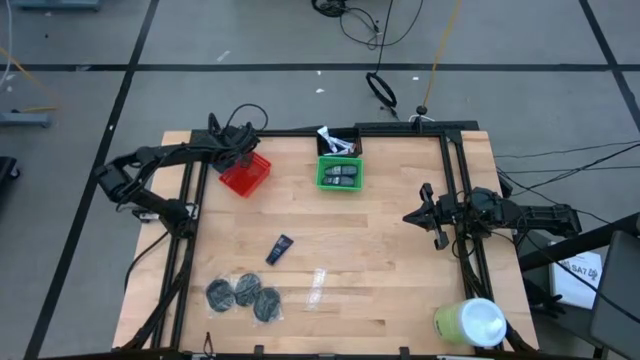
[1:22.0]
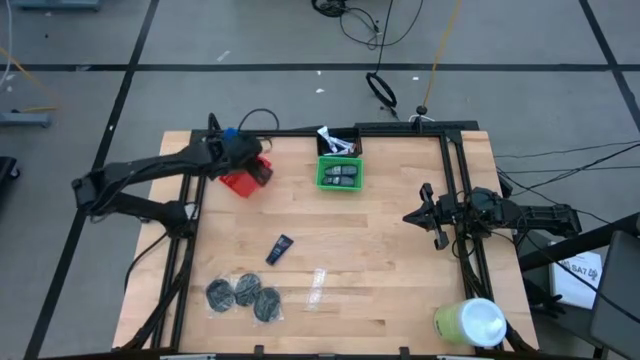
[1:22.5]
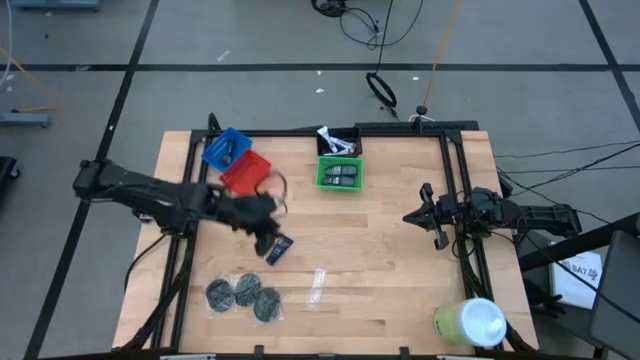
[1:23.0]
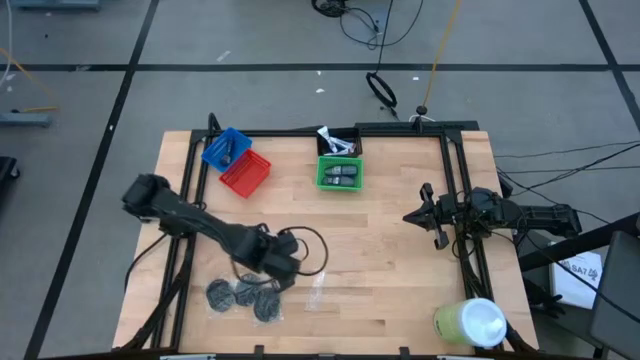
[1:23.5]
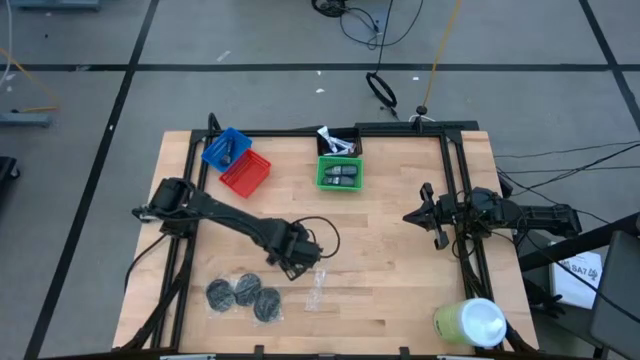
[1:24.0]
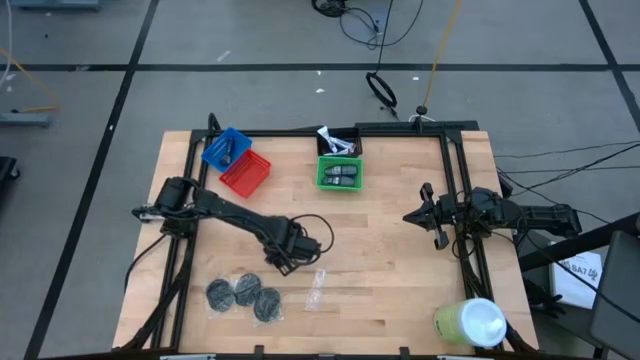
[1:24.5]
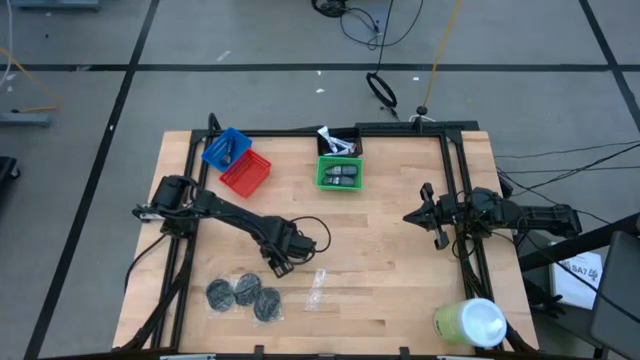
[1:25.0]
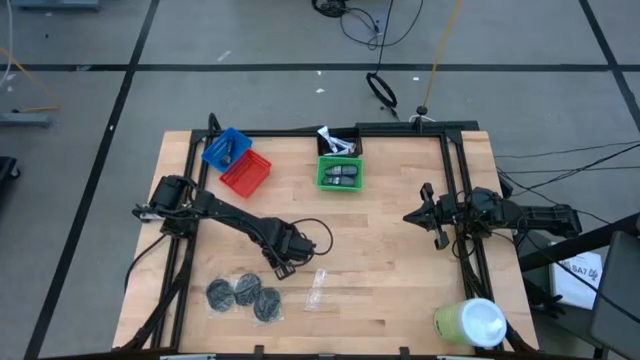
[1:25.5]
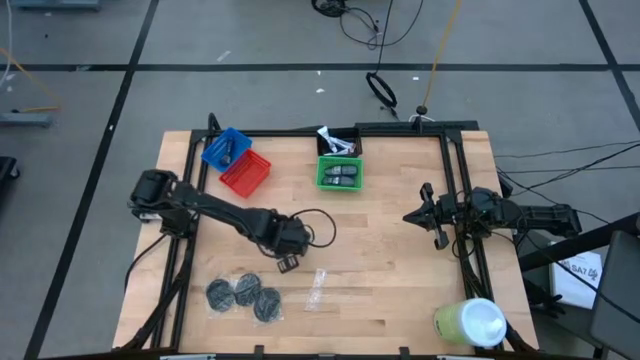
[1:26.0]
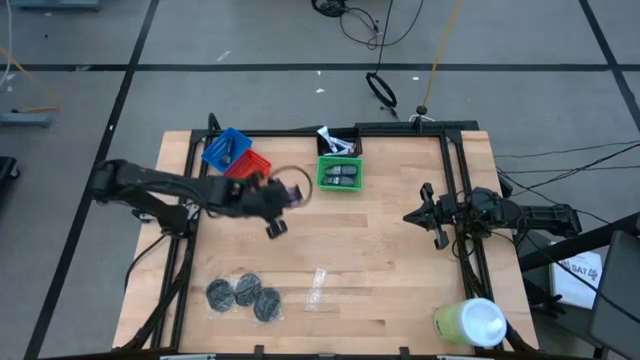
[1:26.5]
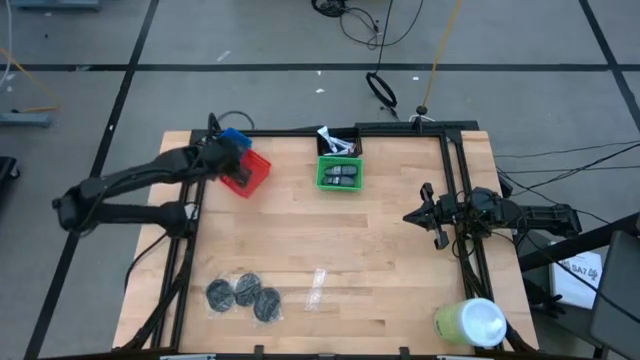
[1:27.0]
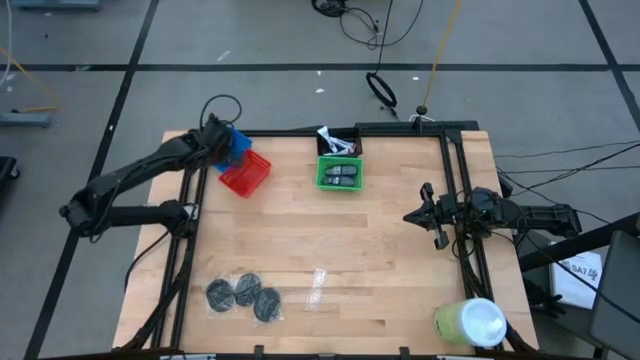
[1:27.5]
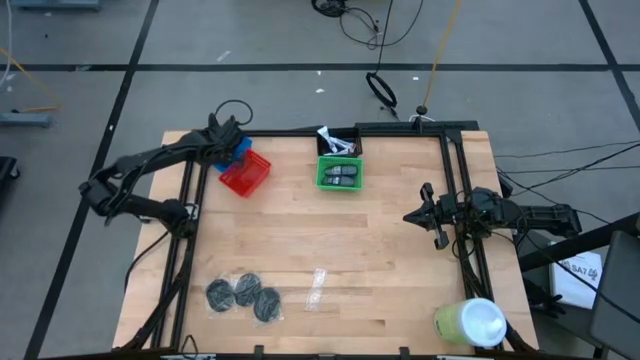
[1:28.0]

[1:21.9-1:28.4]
Task: Pick & Place Travel size toiletries
Put the blue shaving cream into the blue bin

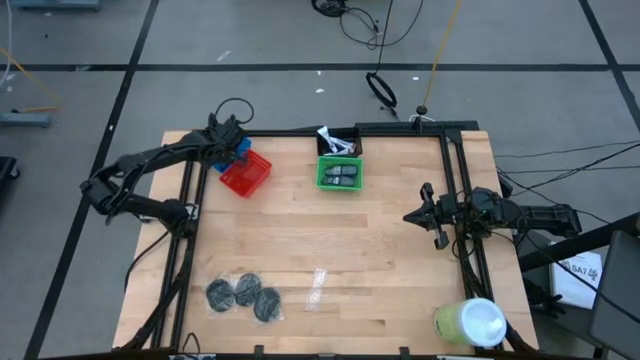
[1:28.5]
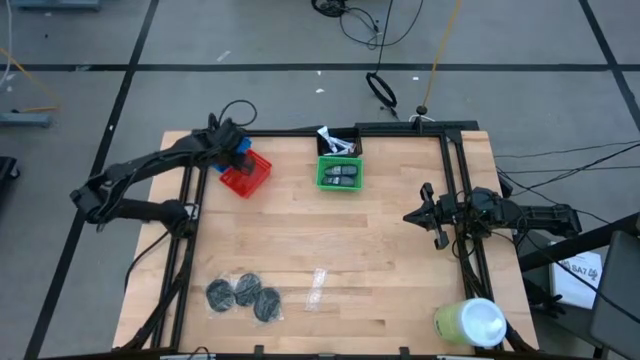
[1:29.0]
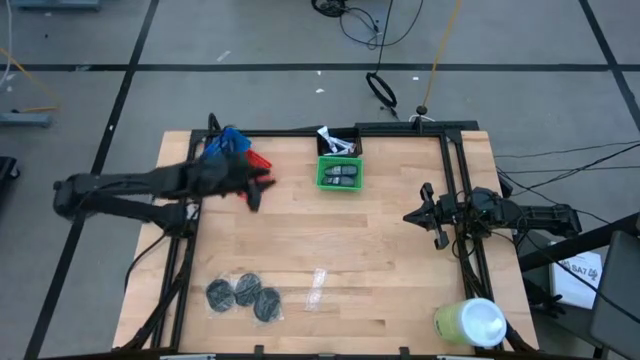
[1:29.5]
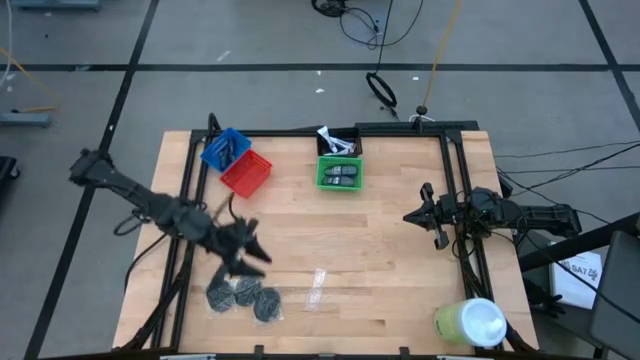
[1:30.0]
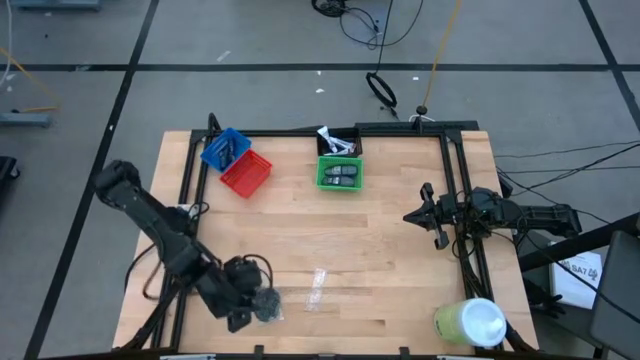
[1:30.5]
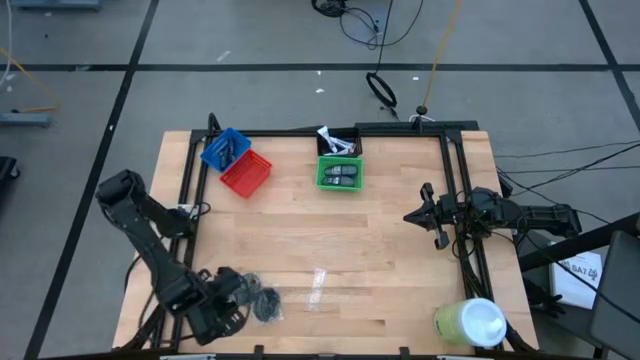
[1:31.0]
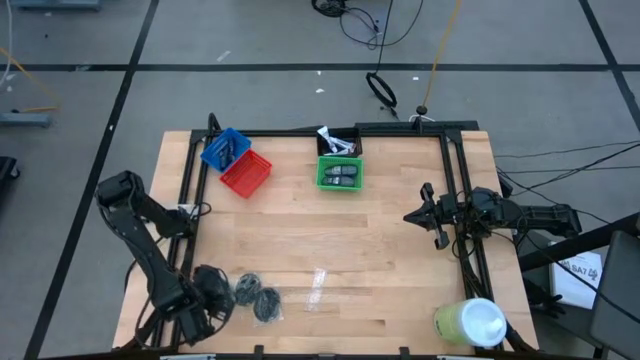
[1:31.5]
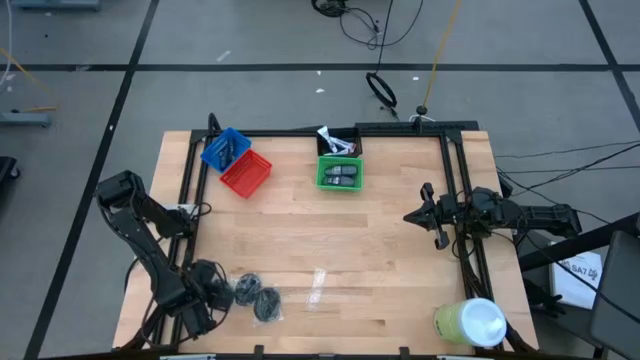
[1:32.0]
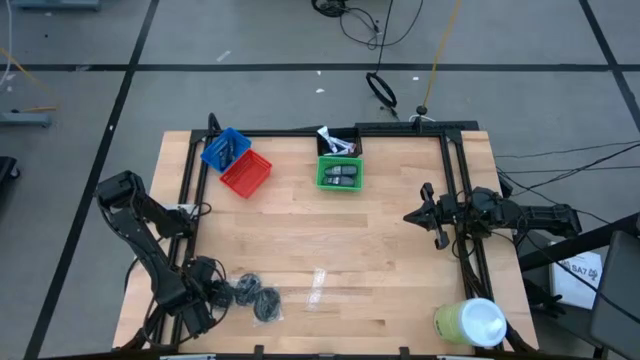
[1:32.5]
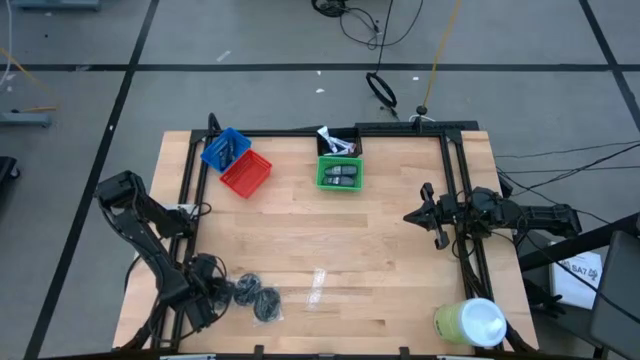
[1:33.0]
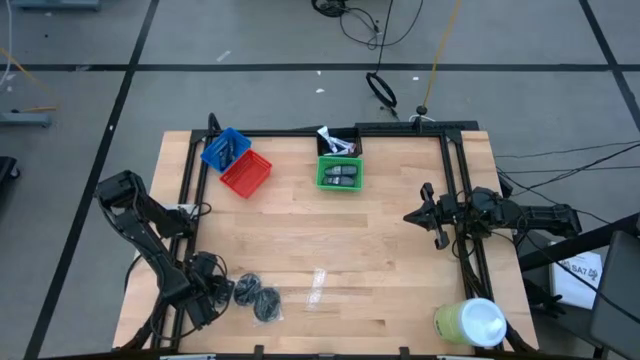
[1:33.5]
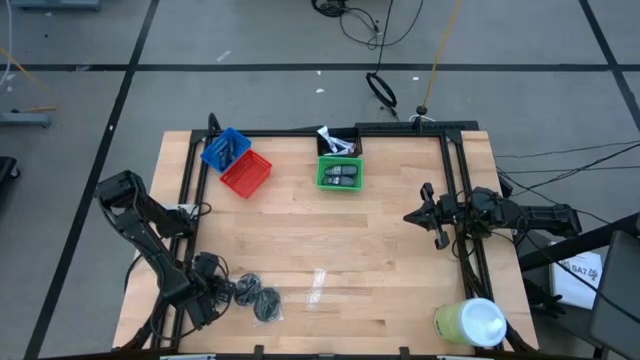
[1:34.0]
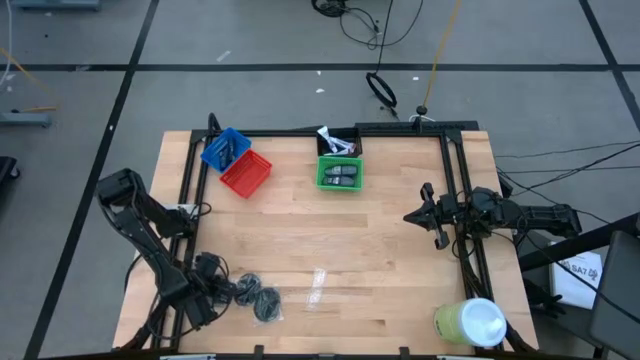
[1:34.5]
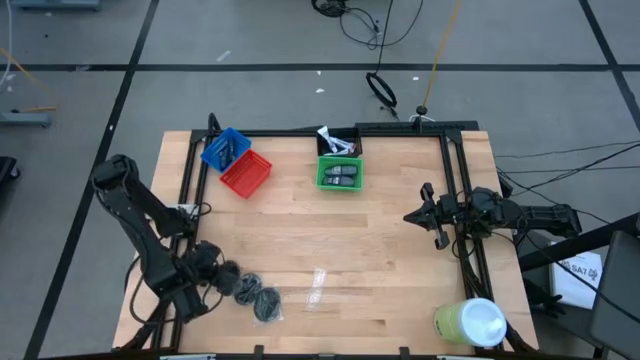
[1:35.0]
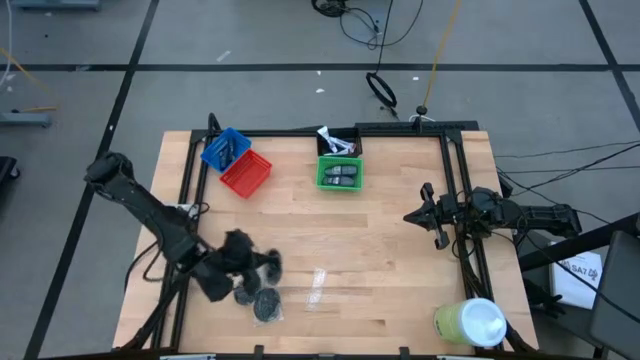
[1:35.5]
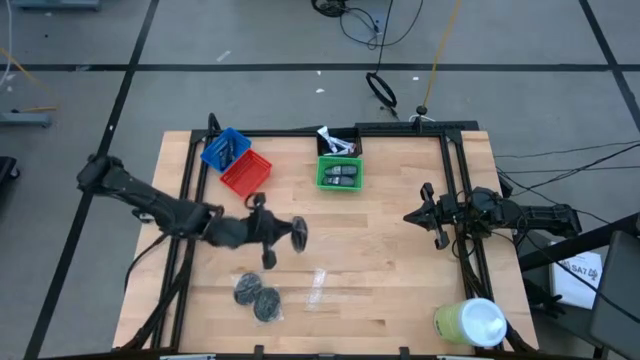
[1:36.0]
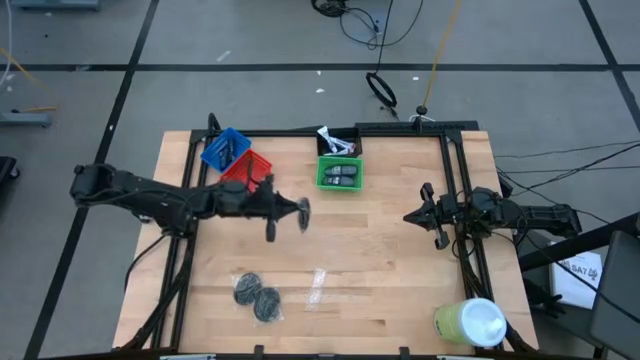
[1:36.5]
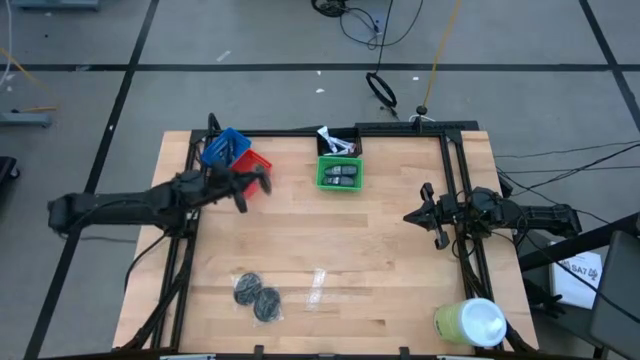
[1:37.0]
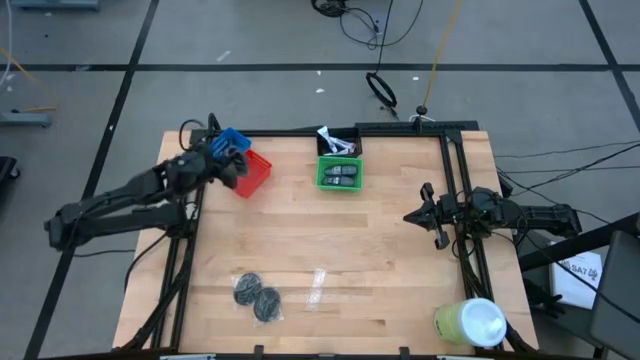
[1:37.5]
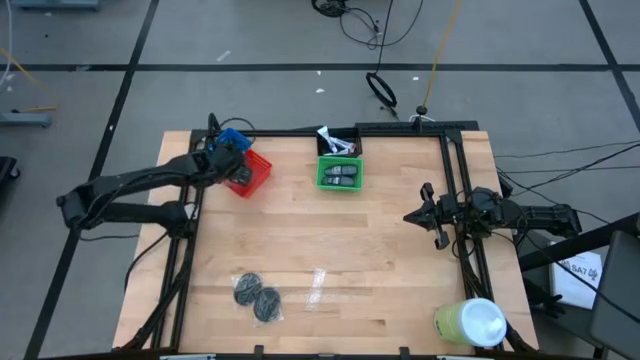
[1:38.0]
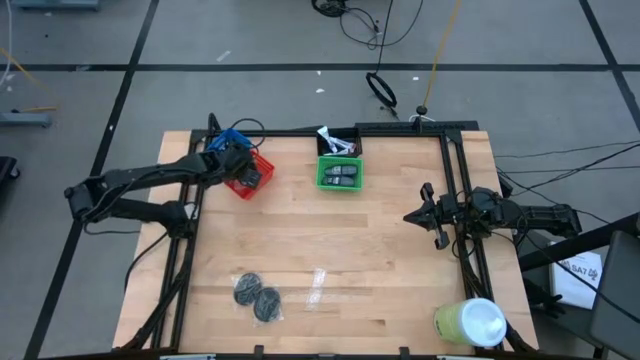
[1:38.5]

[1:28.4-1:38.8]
Put the left black hairbrush into the red bin

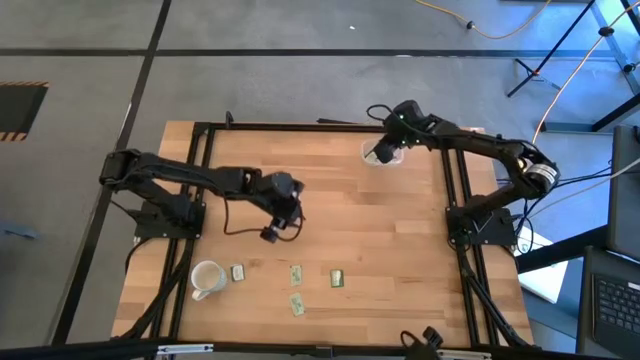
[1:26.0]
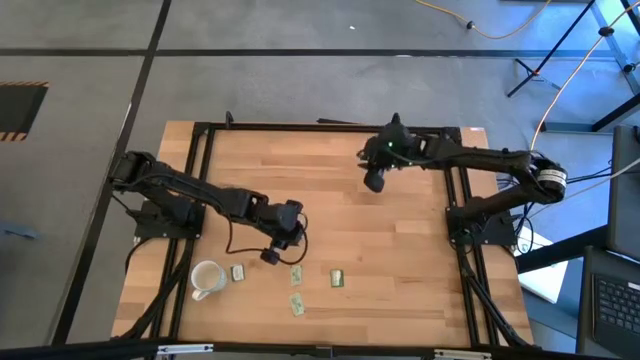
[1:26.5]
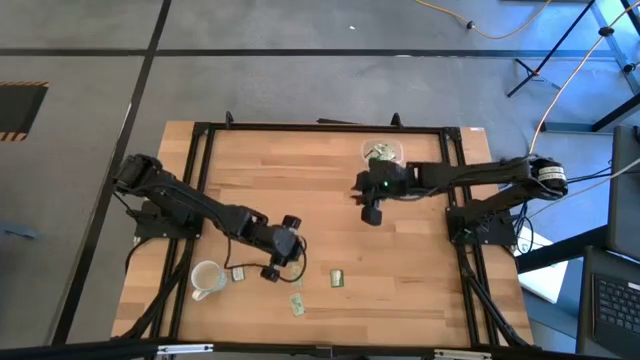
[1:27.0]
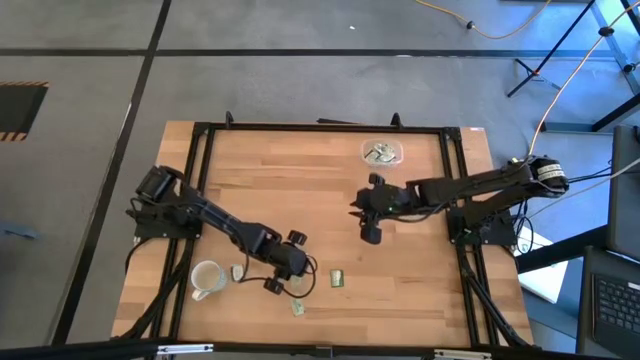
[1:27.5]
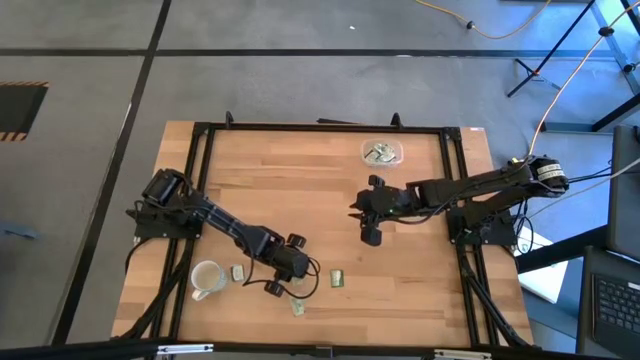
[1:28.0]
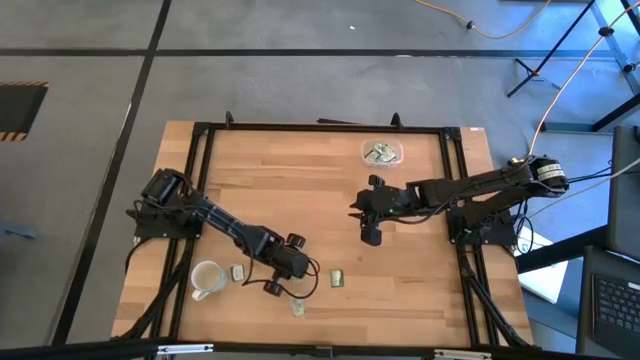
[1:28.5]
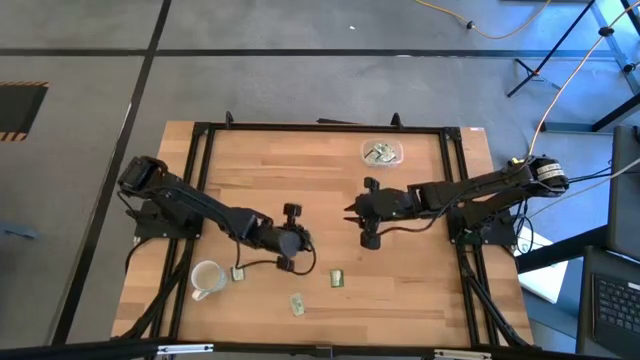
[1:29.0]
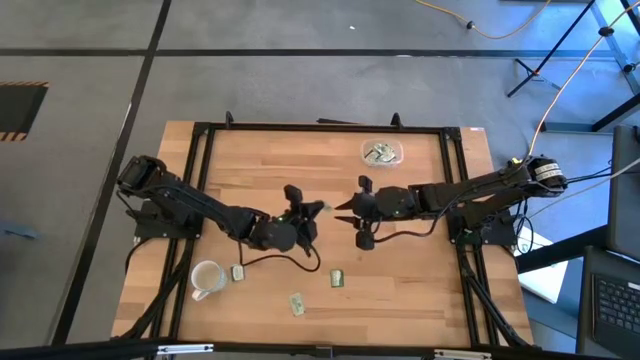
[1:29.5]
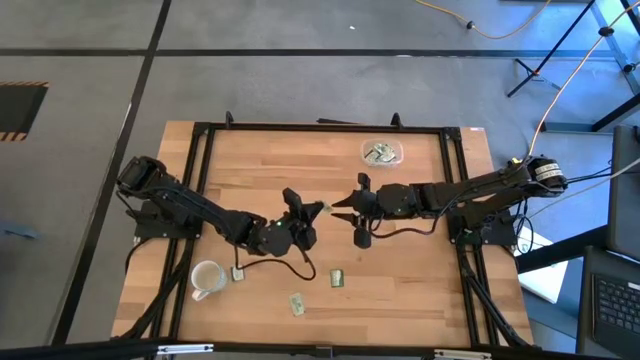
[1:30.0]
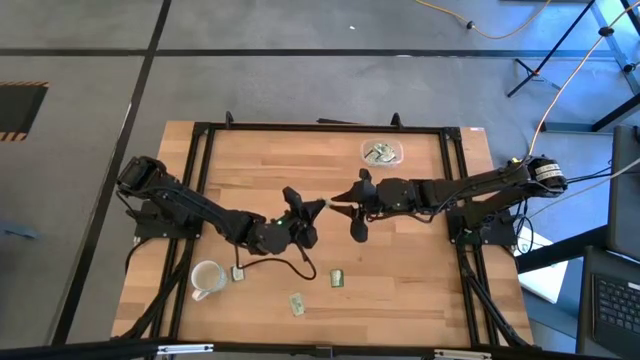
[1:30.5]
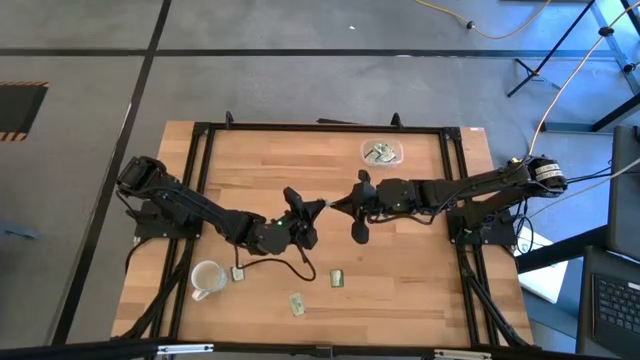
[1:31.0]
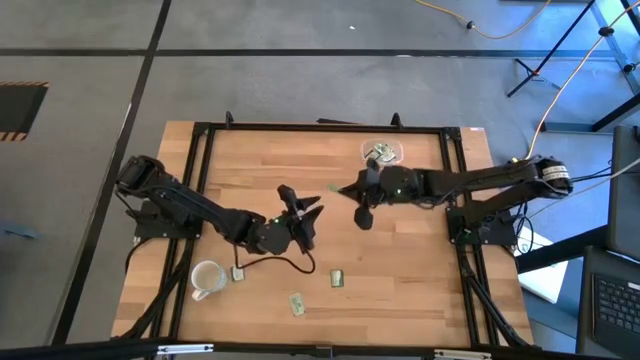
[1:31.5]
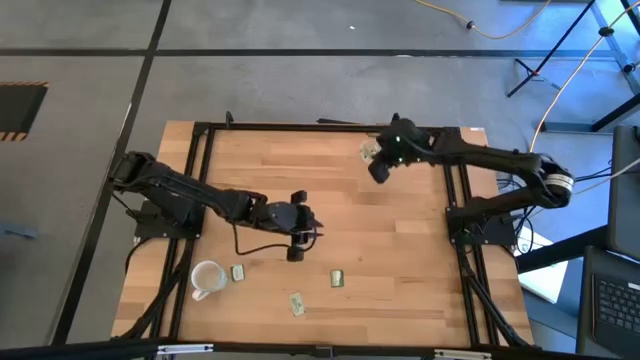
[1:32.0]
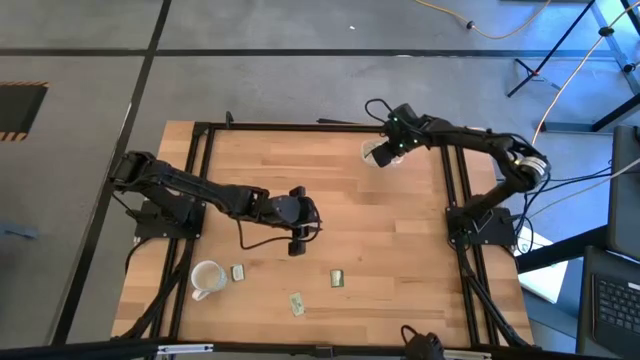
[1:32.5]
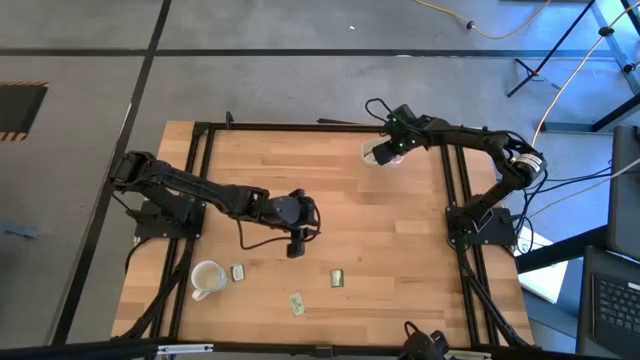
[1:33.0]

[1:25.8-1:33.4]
Task: Pick and place Stevia / Truvia into bins
Put the green stevia packet into the transparent container
